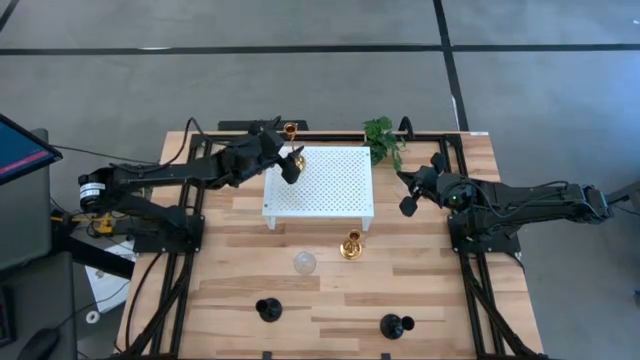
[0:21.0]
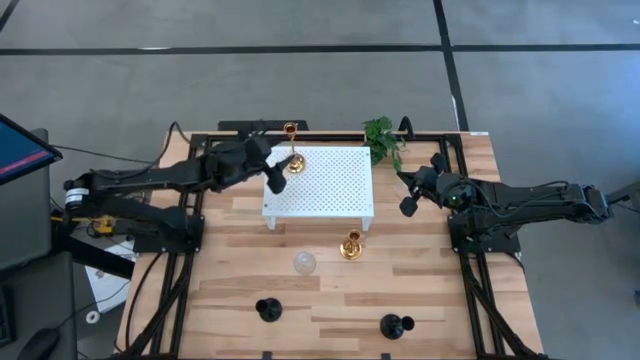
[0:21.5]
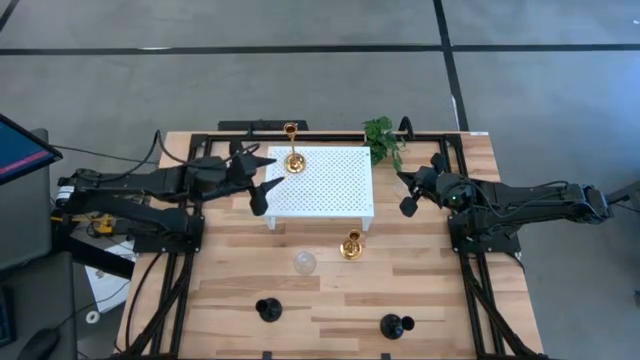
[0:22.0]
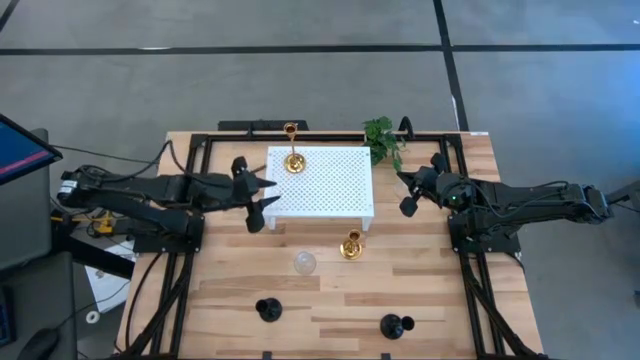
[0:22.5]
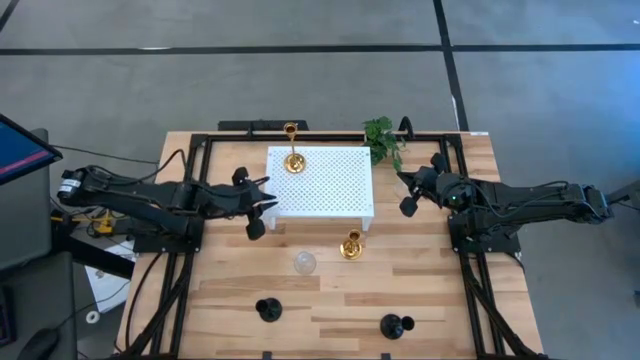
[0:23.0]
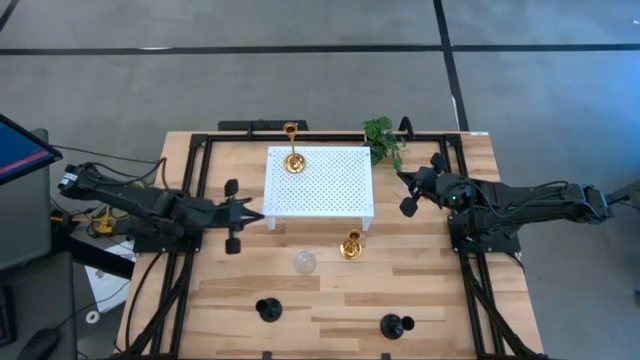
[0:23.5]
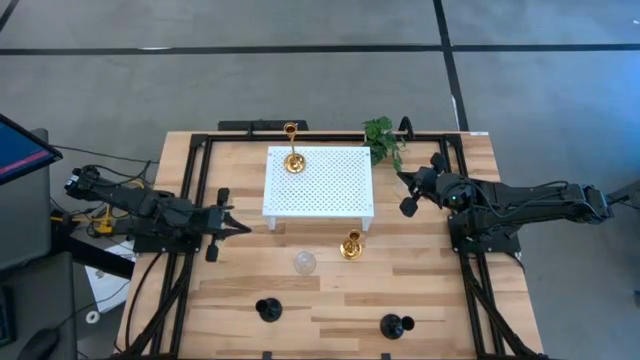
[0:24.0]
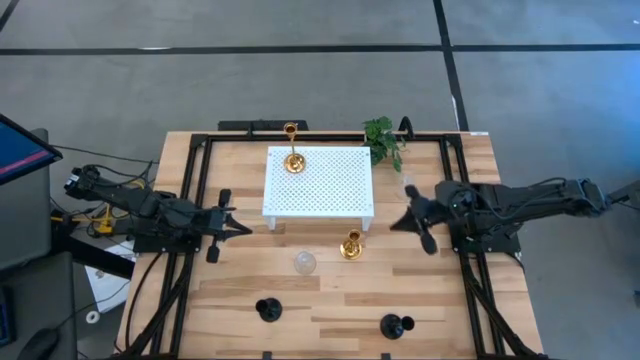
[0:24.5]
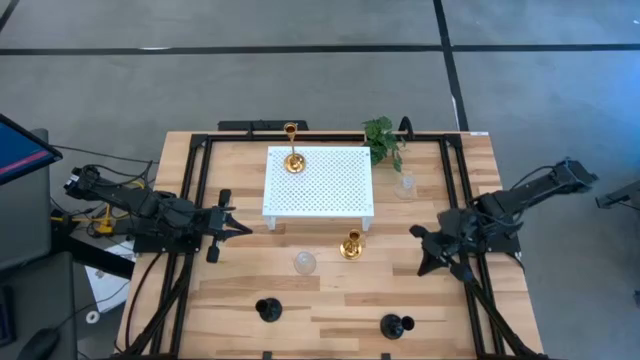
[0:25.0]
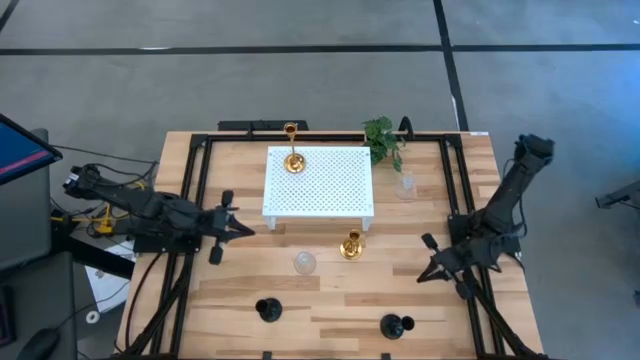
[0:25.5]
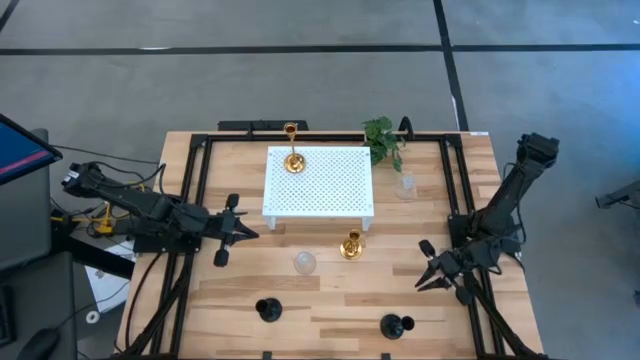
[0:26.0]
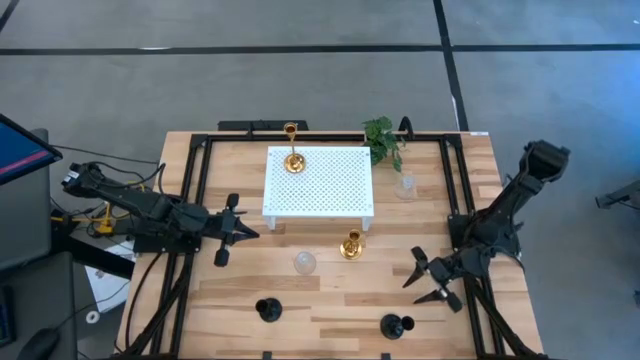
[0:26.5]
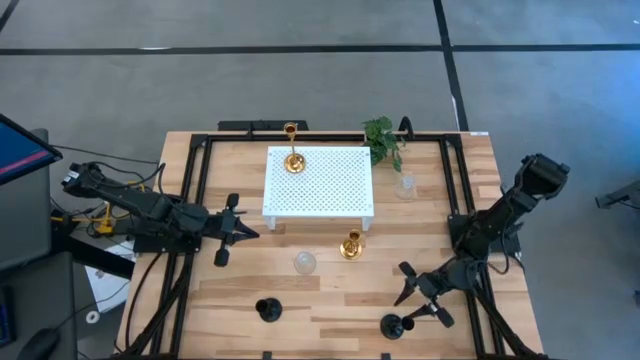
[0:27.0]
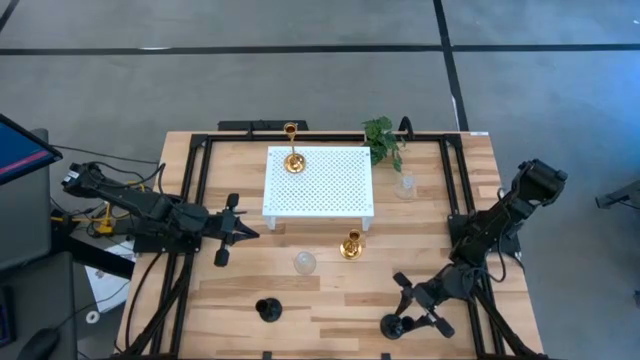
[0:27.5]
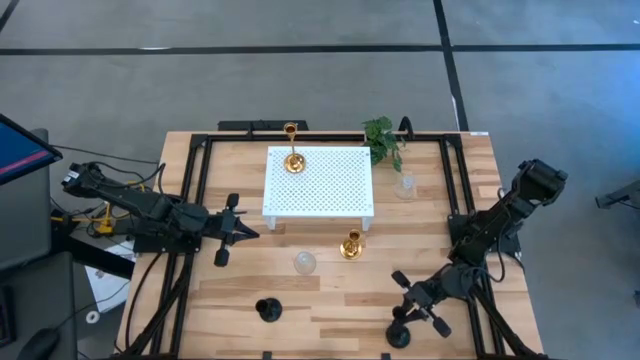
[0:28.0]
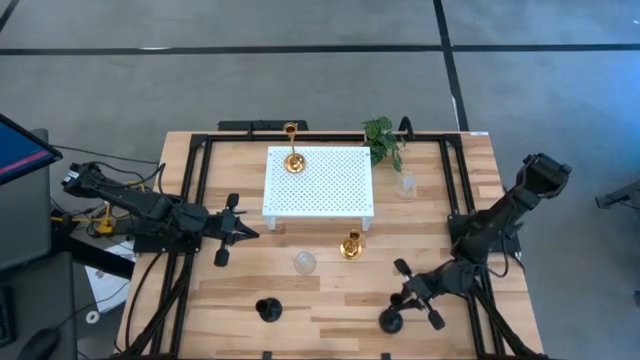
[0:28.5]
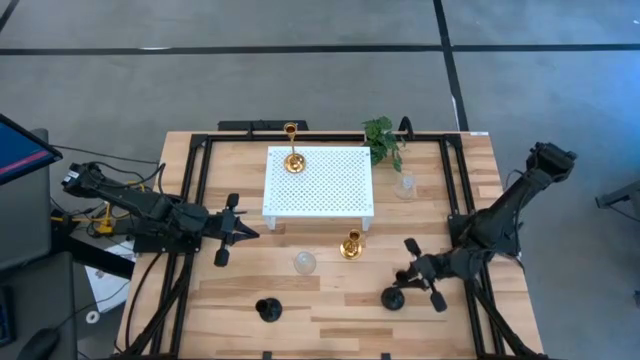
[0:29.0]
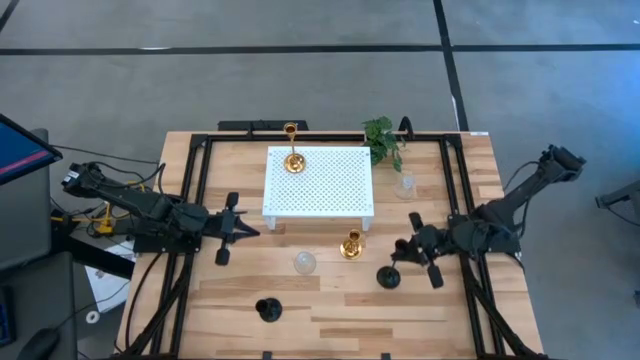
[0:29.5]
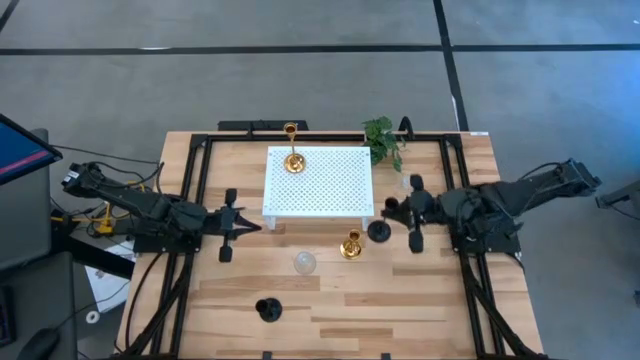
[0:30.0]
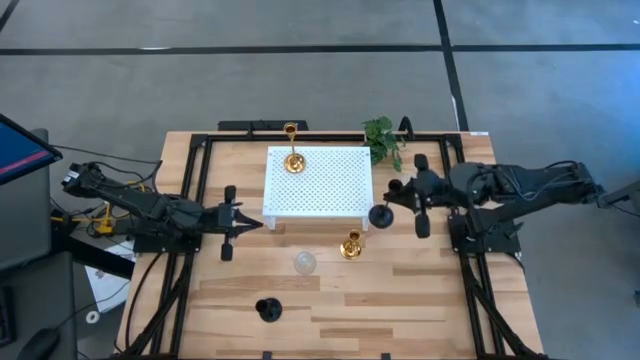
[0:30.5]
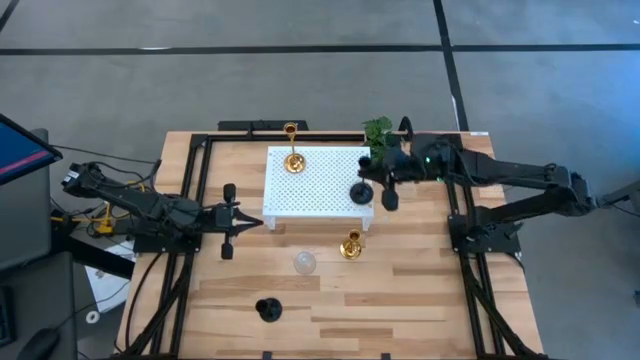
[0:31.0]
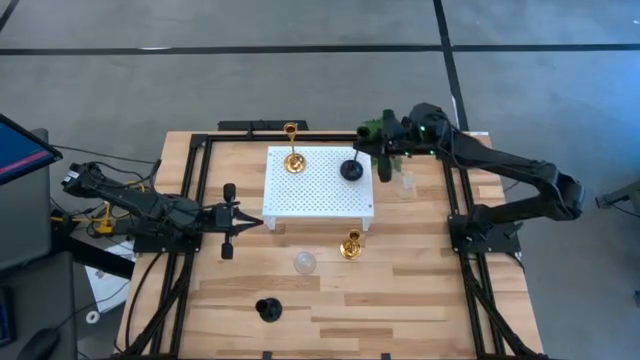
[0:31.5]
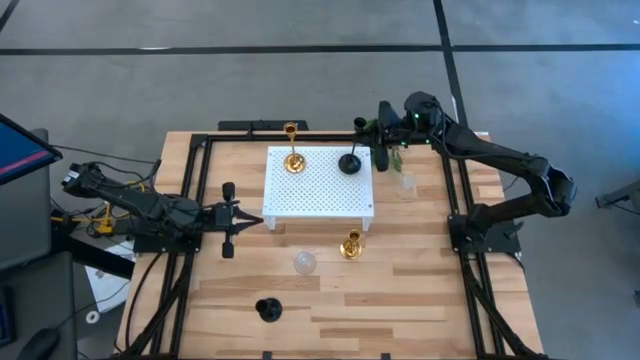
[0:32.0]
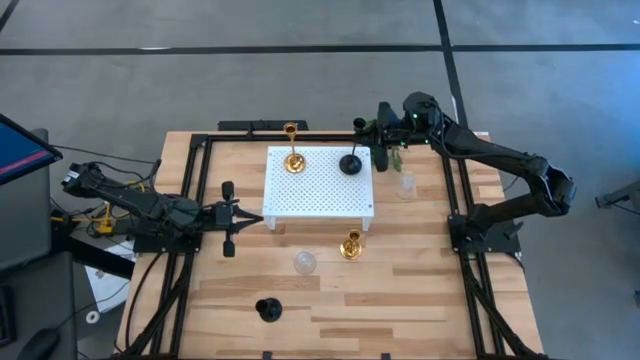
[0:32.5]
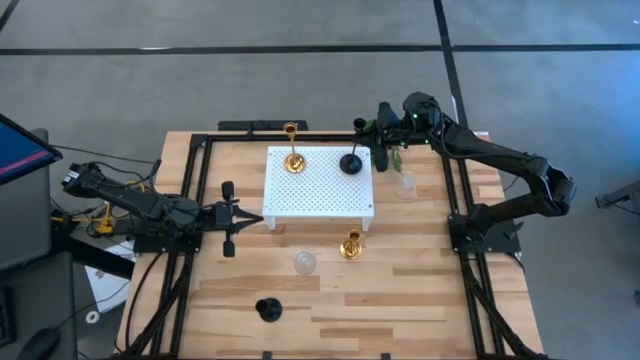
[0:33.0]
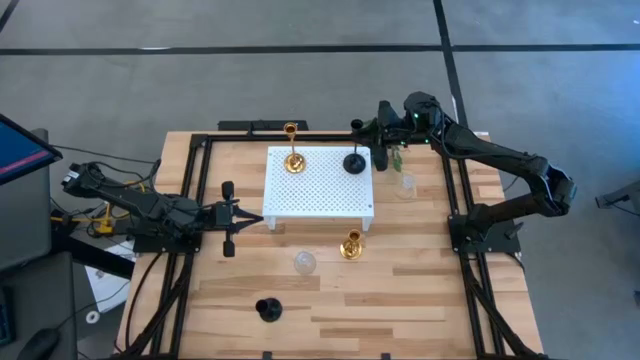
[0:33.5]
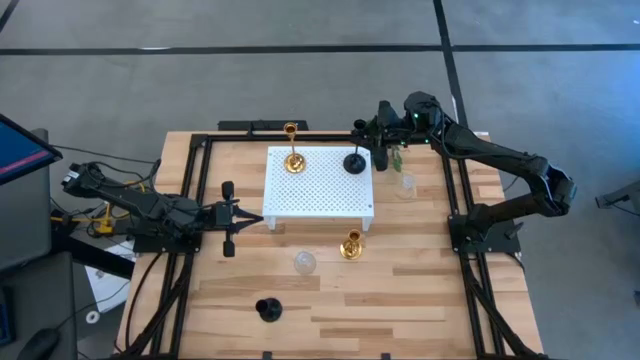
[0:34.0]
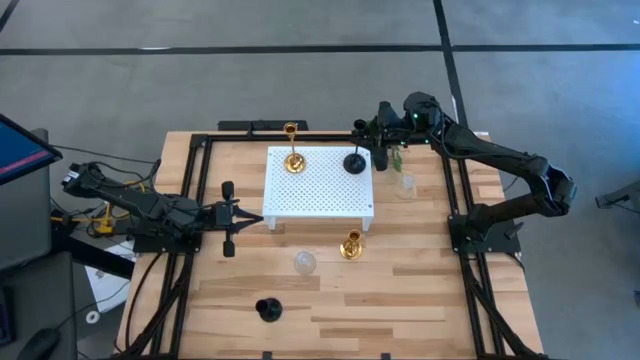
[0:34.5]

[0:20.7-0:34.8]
Task: Pick & Place candle stick holders
Put the bottom black candle holder on the shelf

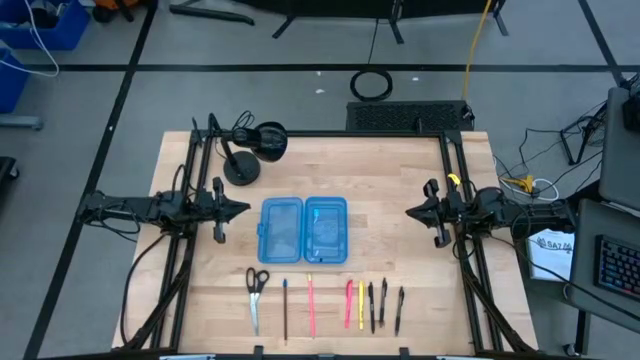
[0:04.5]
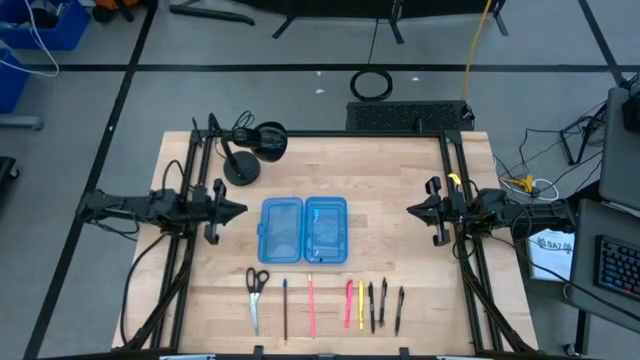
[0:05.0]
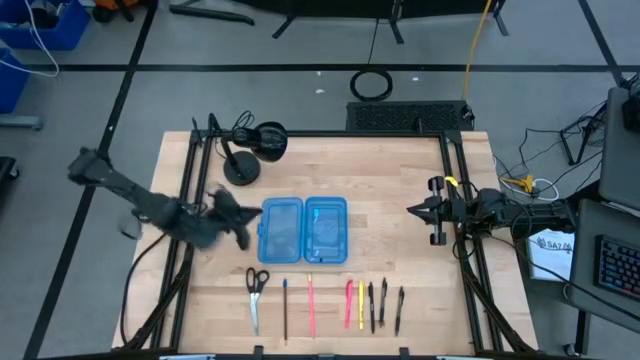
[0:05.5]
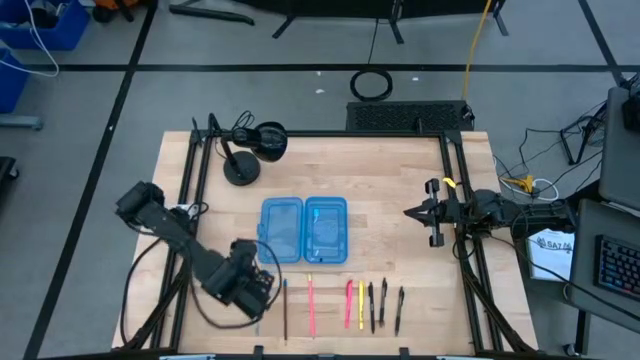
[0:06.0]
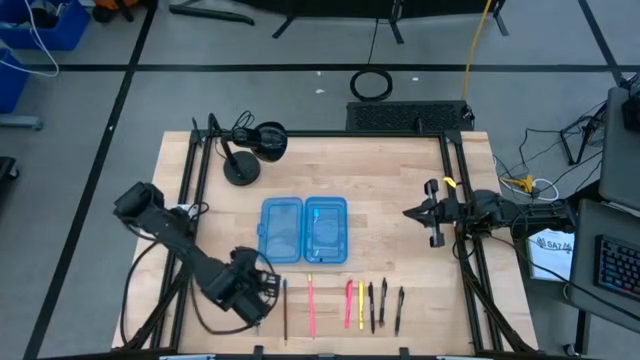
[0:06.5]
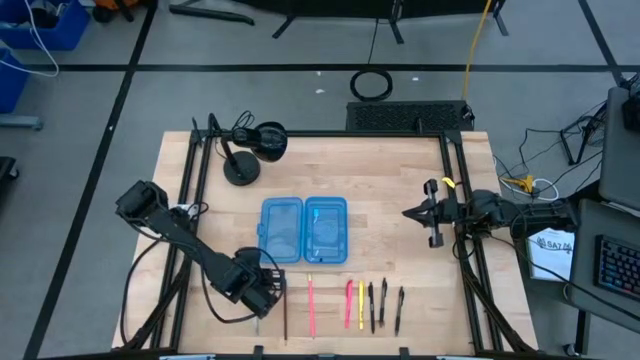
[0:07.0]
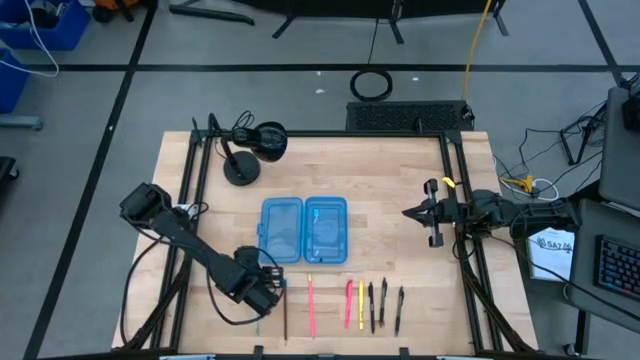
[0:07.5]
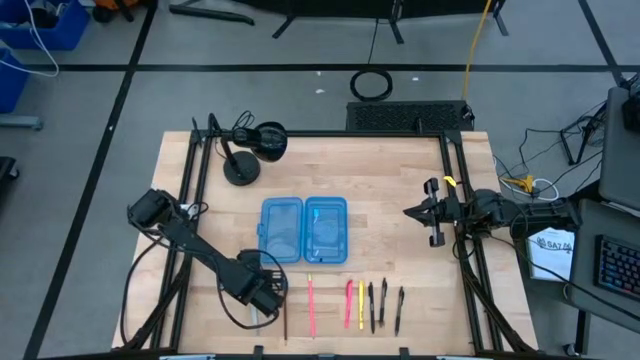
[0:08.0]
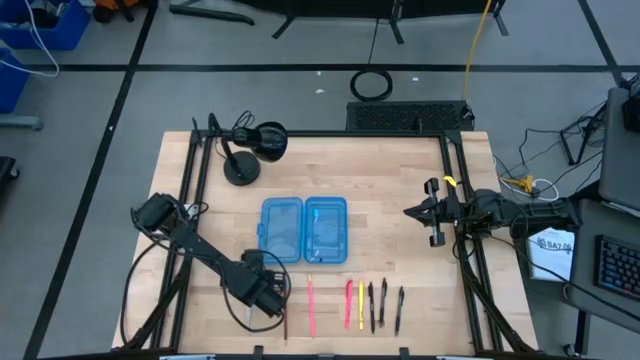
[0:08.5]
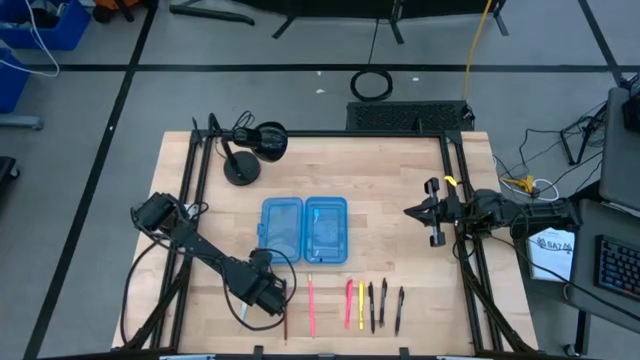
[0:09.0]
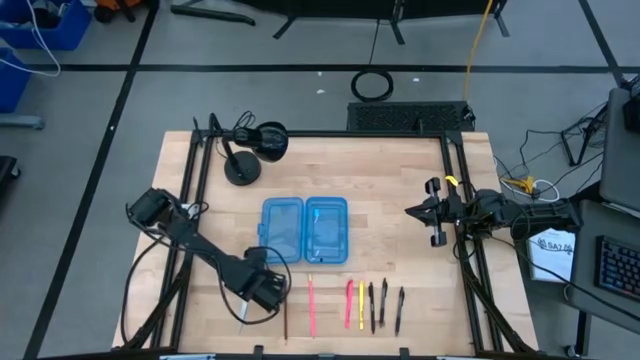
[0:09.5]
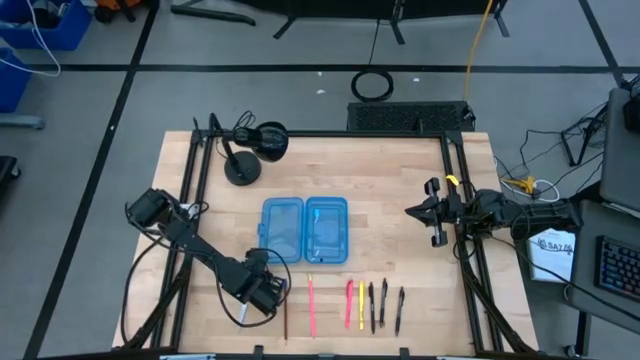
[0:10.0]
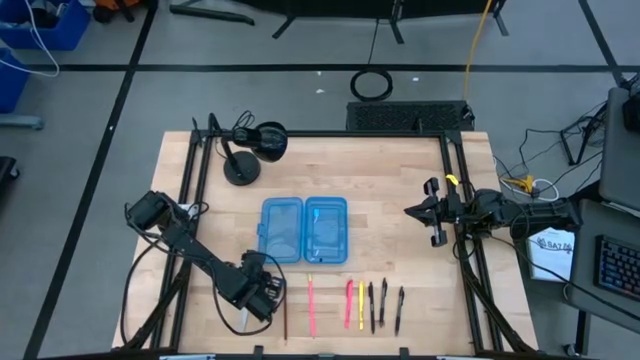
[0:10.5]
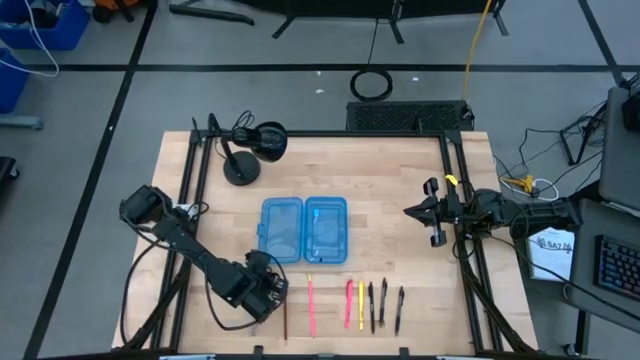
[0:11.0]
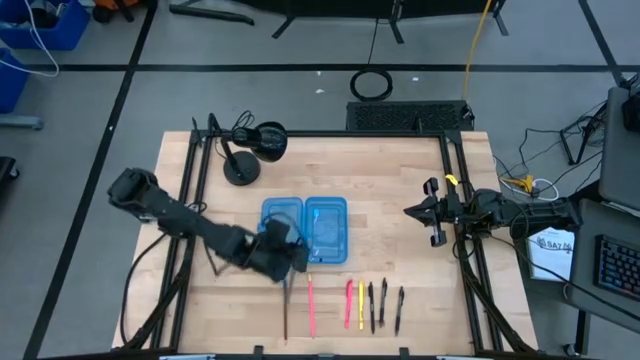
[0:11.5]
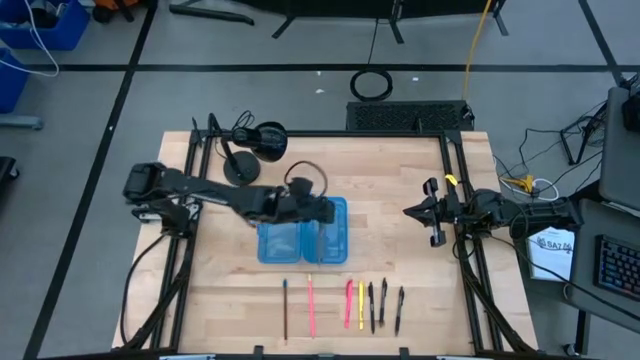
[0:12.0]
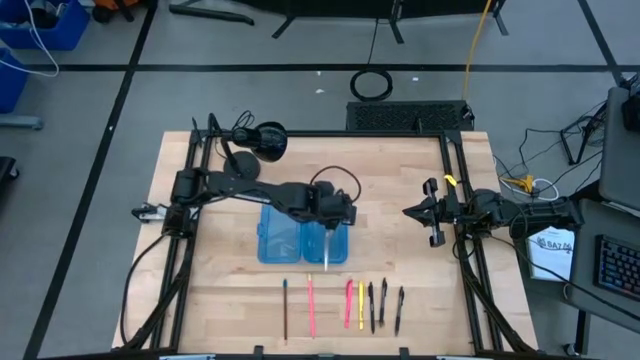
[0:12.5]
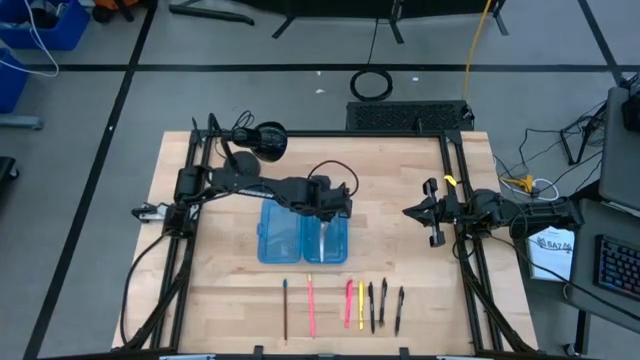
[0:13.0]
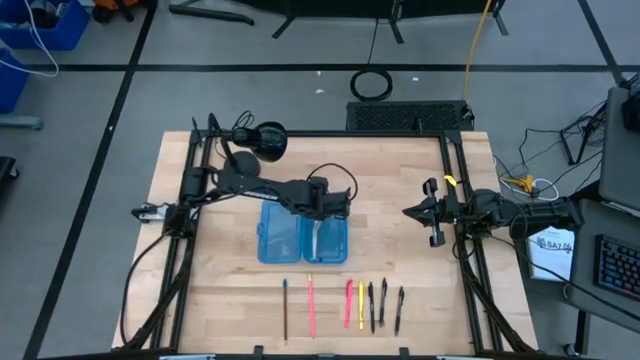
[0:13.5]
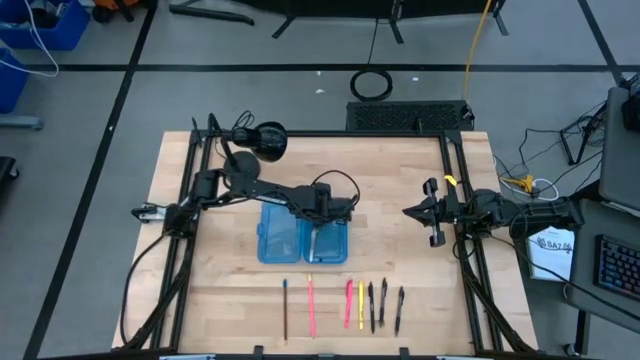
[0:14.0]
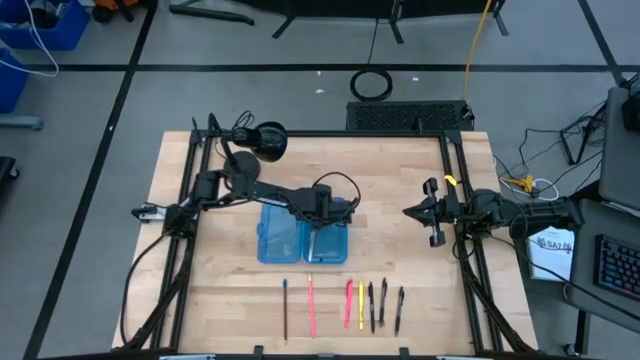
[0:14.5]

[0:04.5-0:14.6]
Task: Pick & place school supplies into a supply box
Put the black scissors into the blue box
